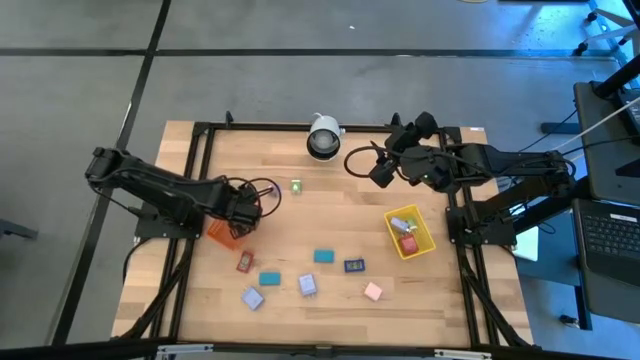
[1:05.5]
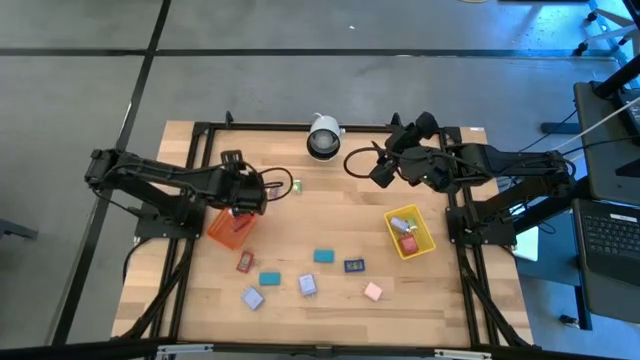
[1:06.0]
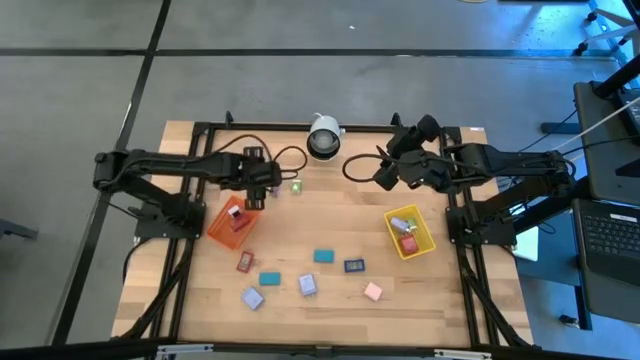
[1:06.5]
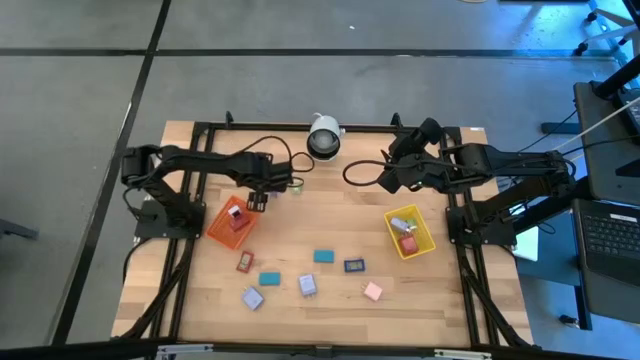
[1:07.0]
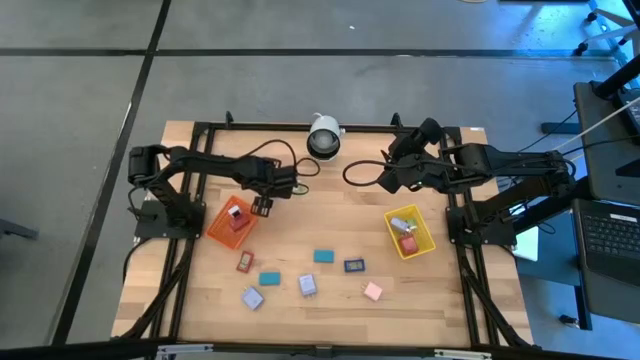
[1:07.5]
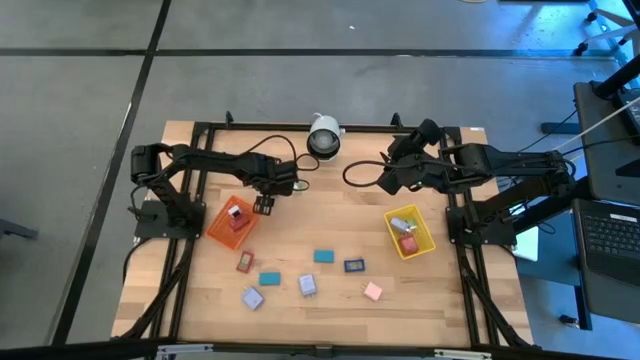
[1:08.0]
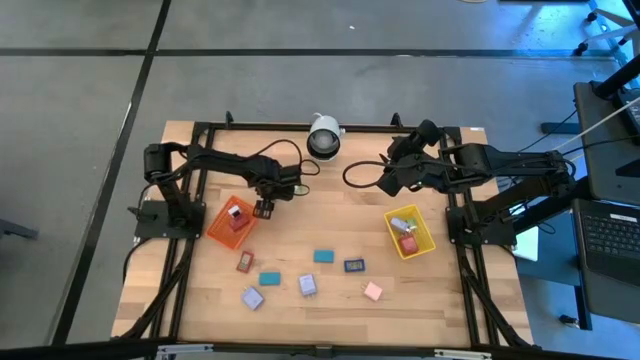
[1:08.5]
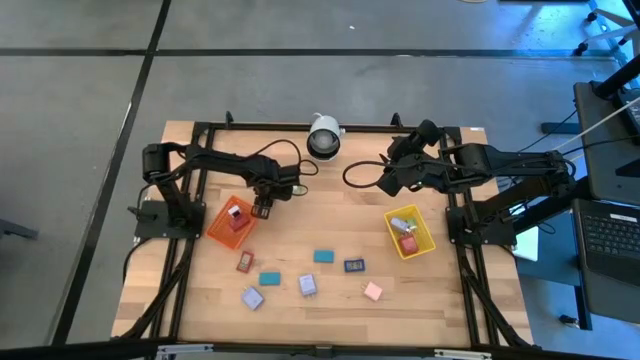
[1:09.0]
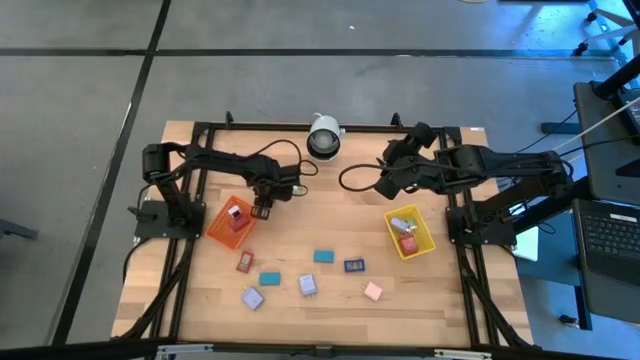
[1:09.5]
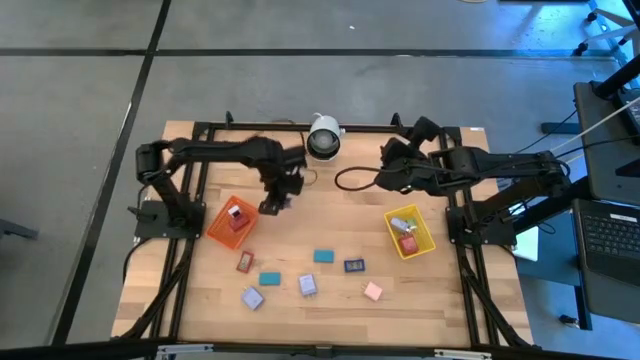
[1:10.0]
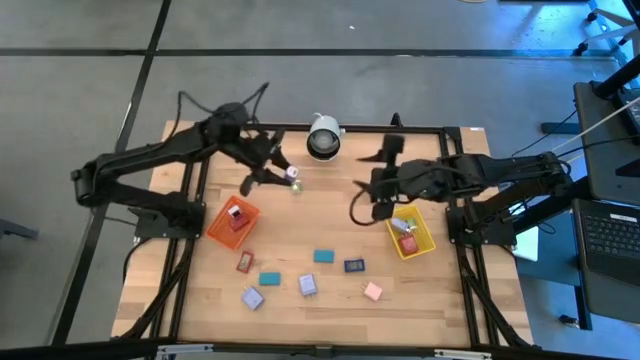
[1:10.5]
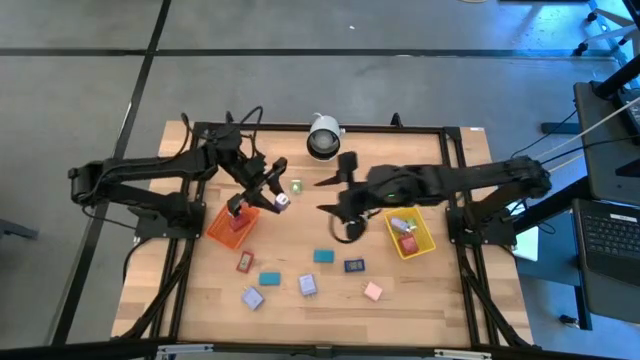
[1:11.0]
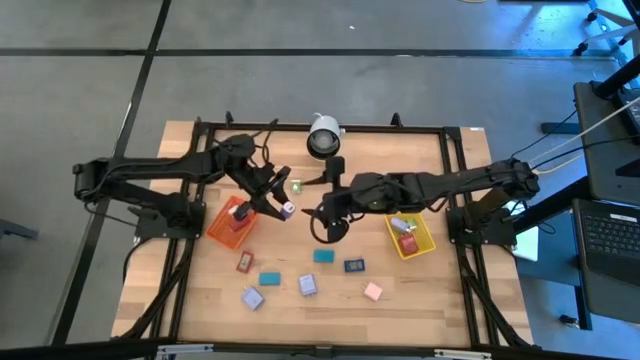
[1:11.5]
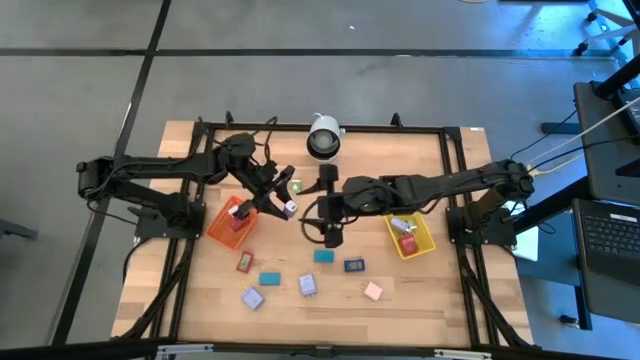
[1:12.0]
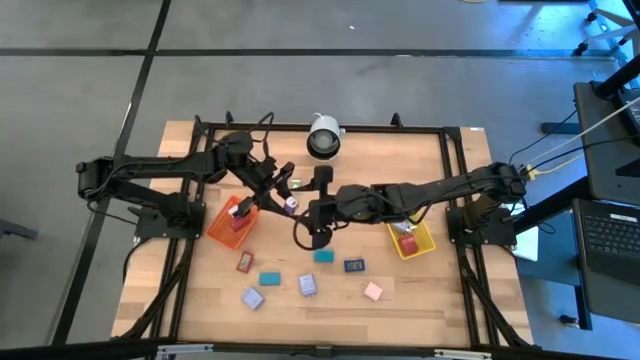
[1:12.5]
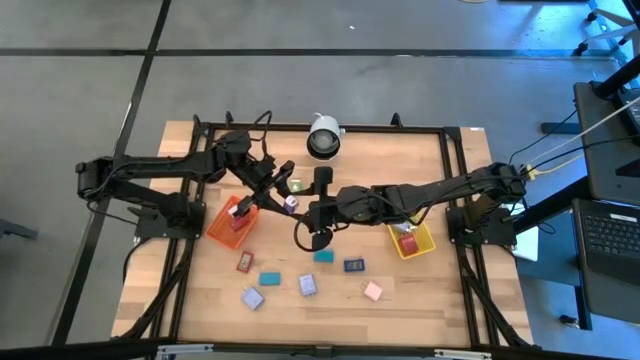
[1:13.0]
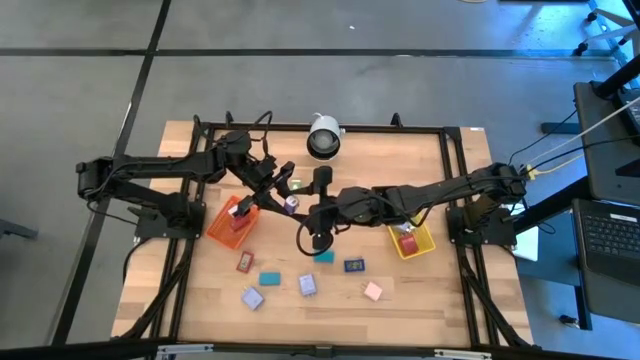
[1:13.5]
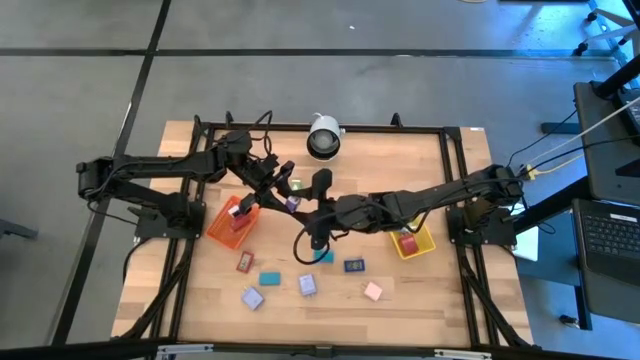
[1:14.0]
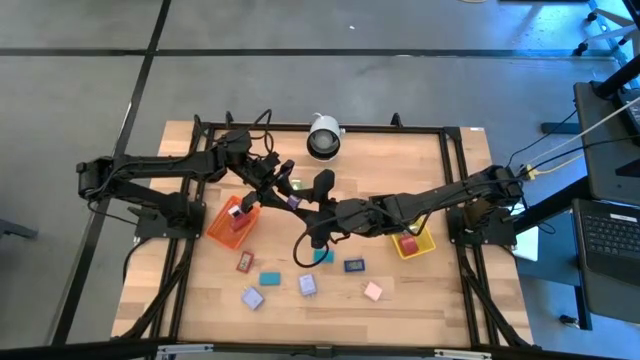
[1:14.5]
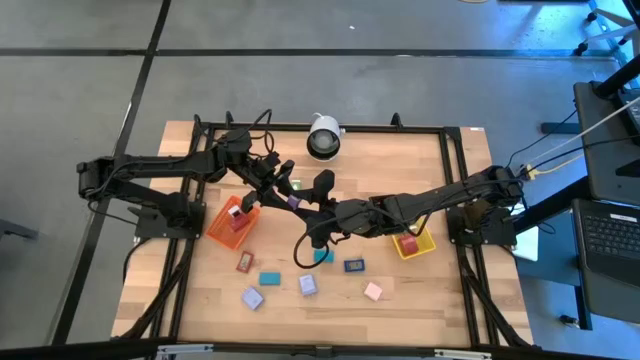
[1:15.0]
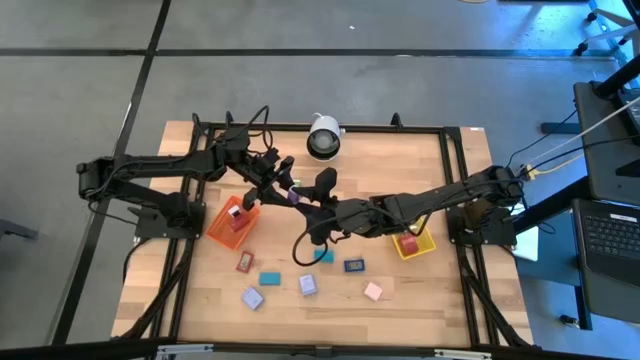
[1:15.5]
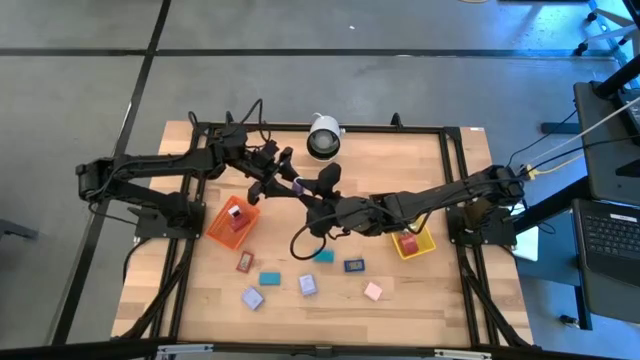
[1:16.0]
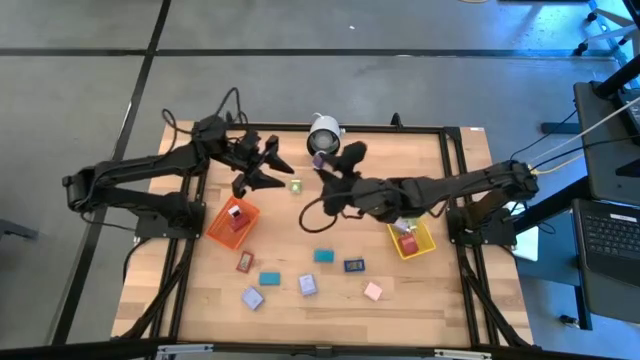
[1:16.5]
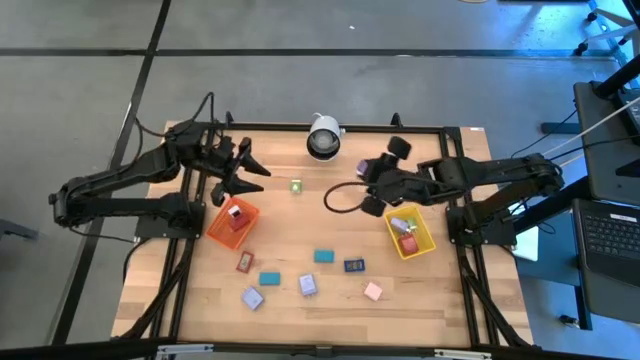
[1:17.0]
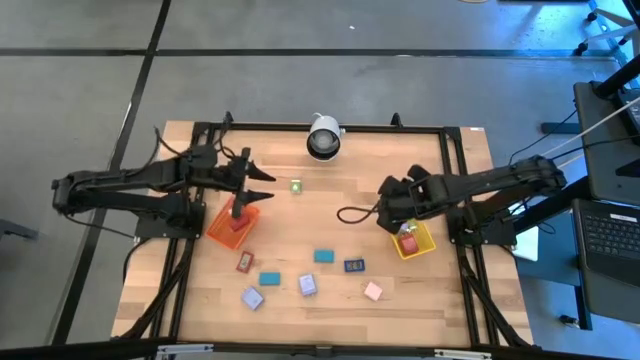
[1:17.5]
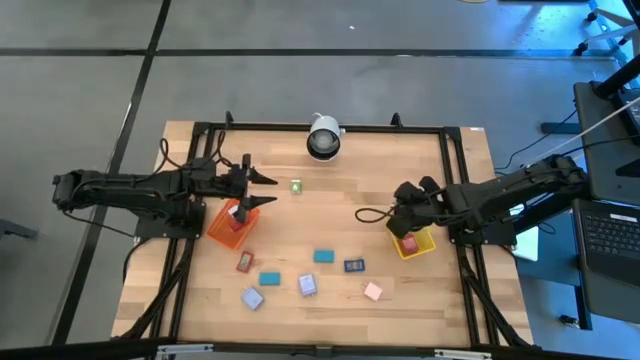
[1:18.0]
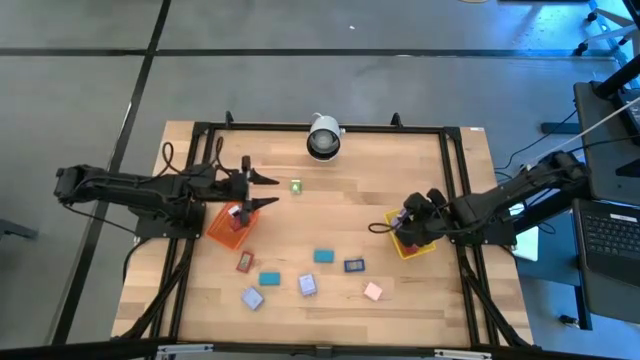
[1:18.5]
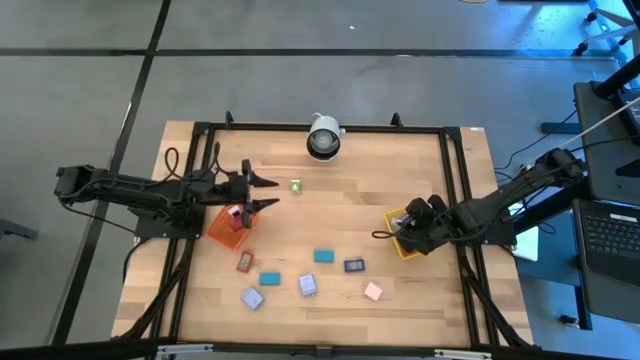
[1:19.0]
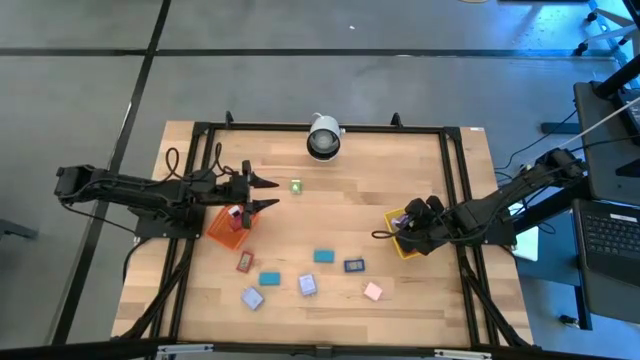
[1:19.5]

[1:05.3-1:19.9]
Task: Pick & Place Office items
Put the violet charger adapter into the yellow basket

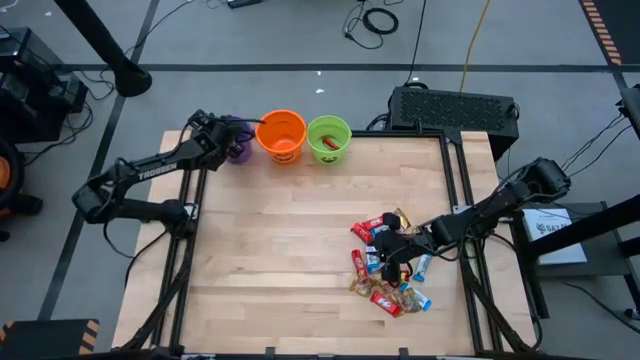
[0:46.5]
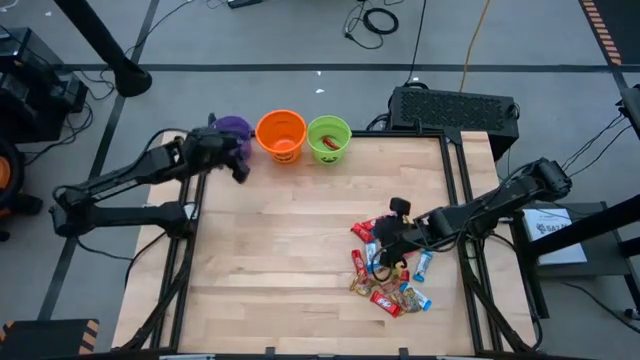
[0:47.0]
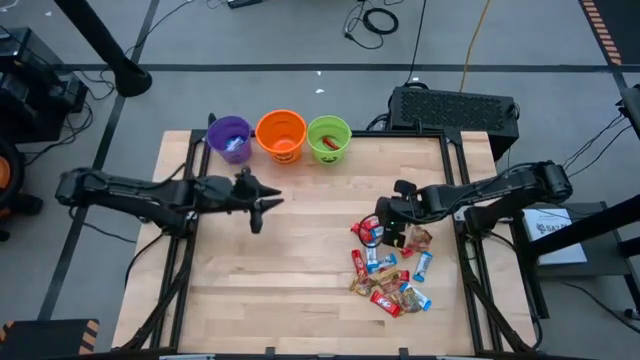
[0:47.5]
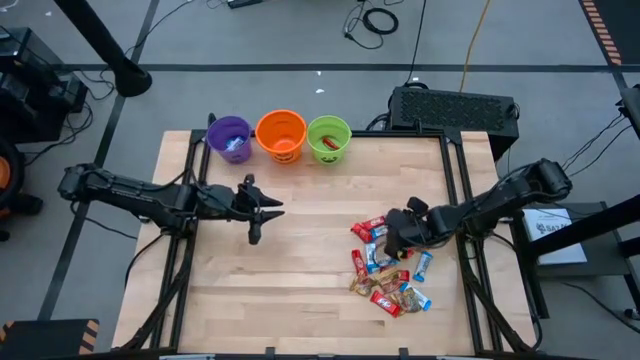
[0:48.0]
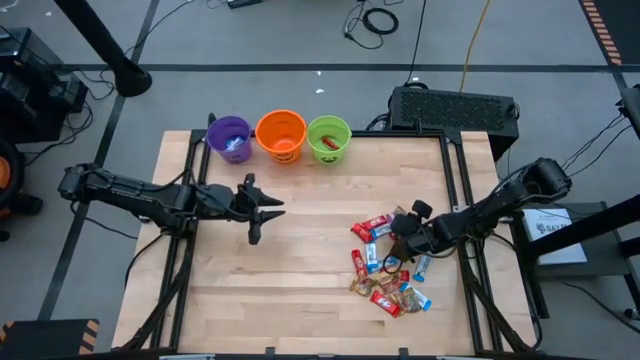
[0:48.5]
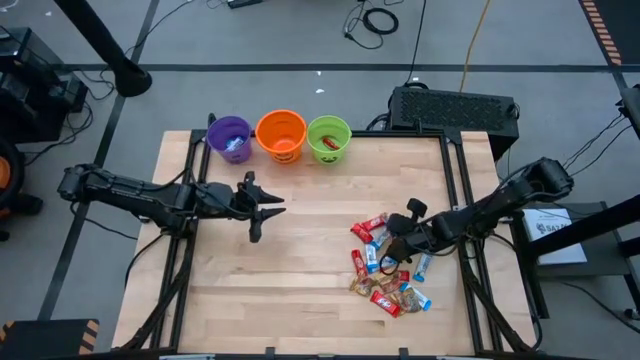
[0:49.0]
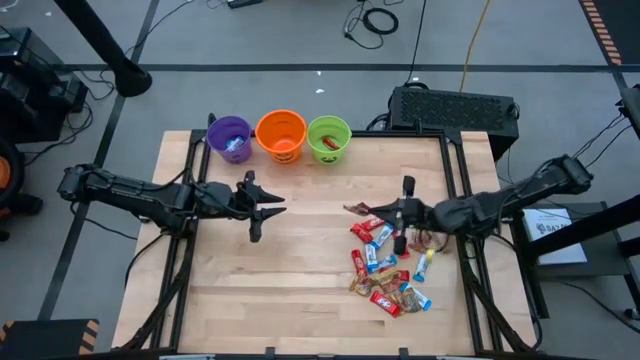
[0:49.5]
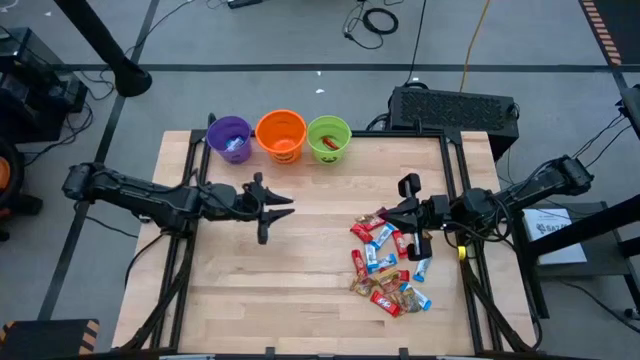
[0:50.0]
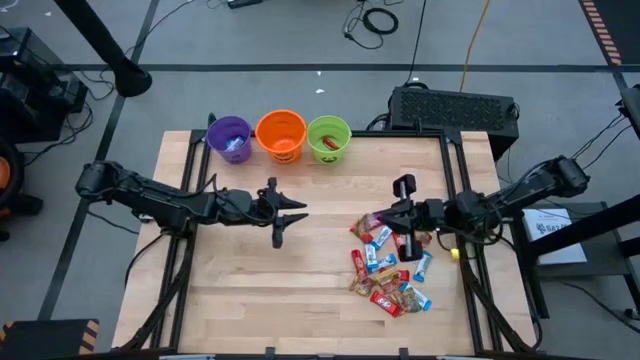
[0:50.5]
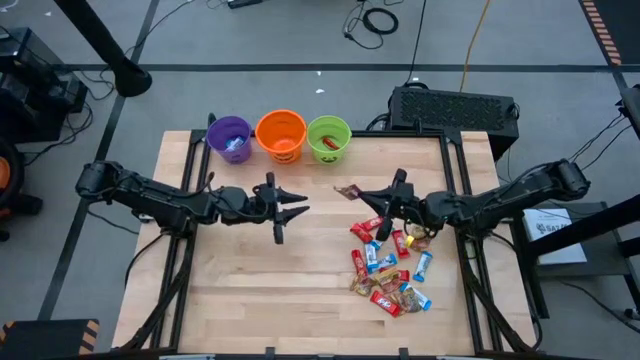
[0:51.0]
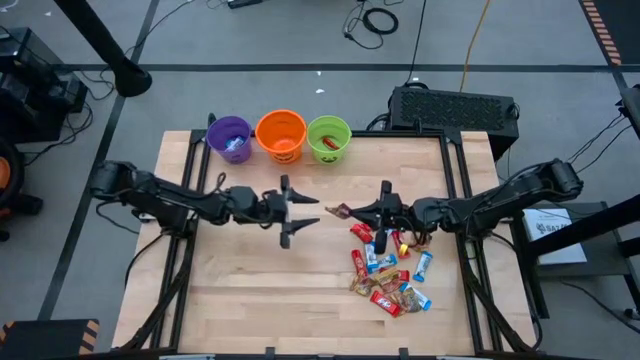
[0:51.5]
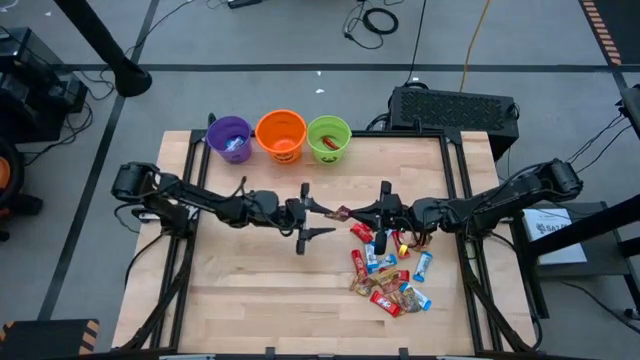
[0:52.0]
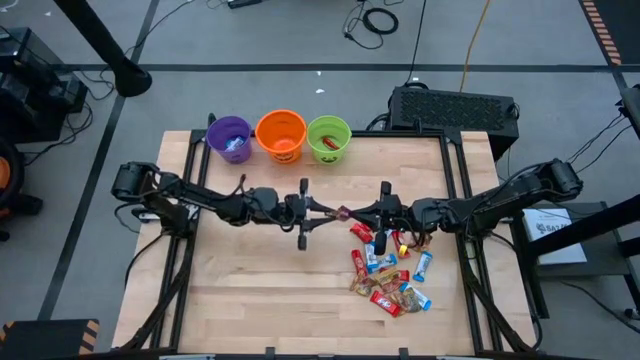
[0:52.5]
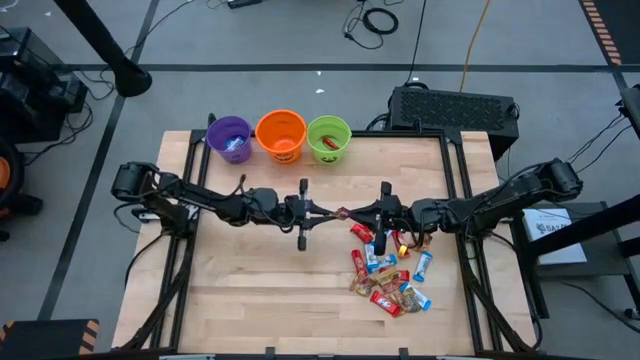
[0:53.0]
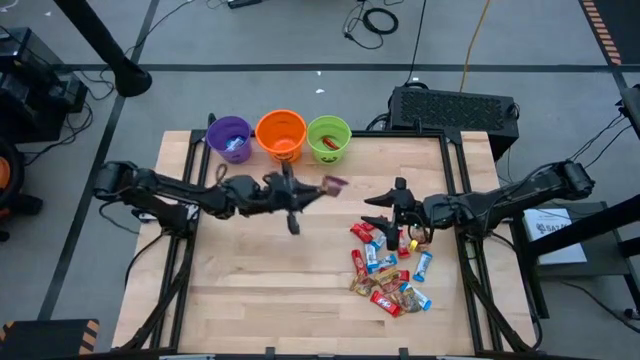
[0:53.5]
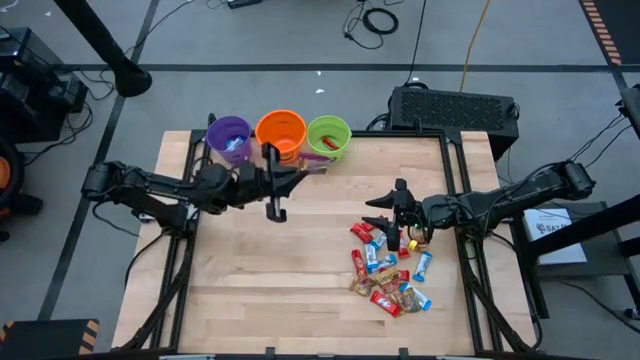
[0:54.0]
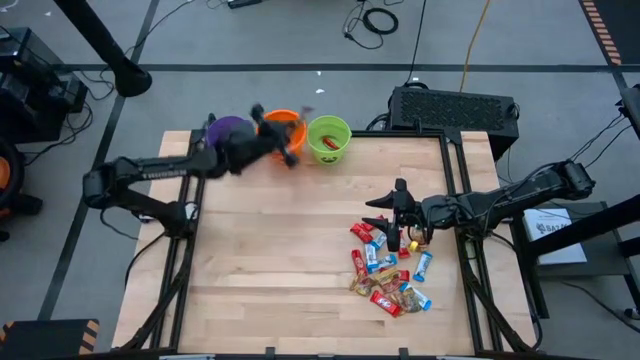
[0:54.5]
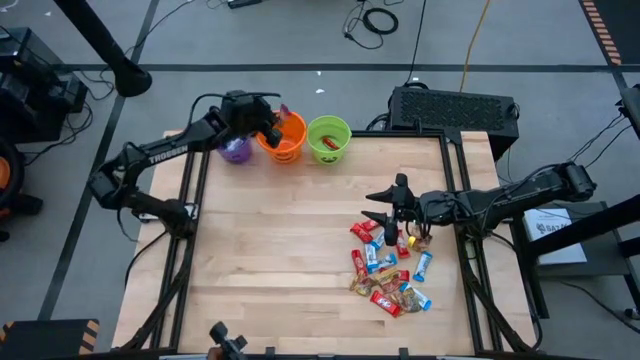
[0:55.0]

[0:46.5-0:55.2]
Task: Sort candy by brand, put in halloween buckets
Put the violet candy into the orange bucket

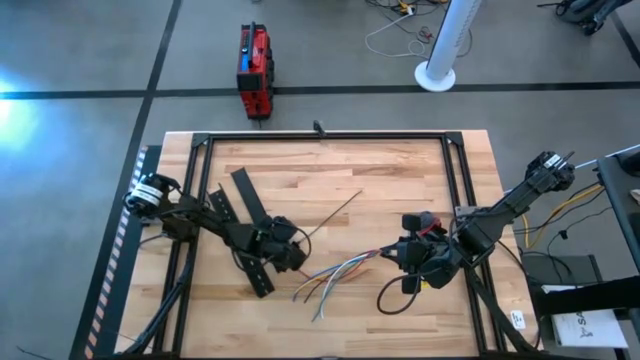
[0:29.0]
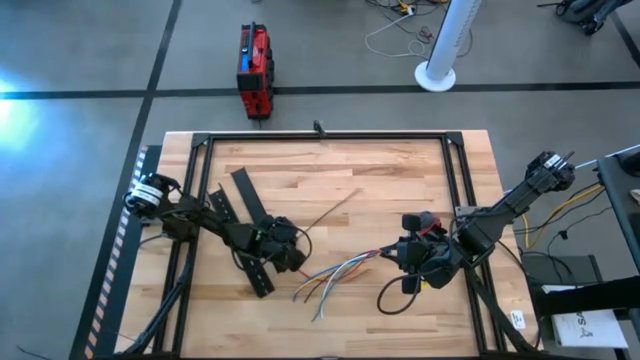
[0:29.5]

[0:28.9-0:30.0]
Task: Ziptie cables
Wrap the cable wires with the black zip tie
